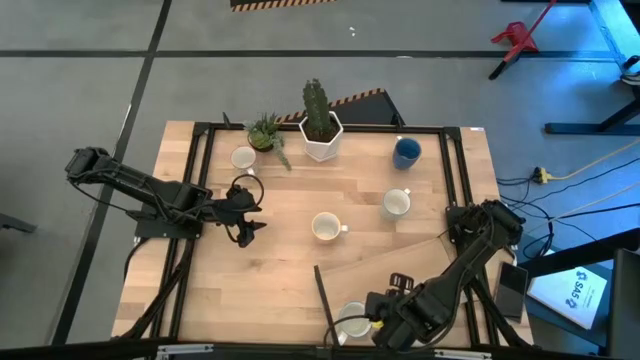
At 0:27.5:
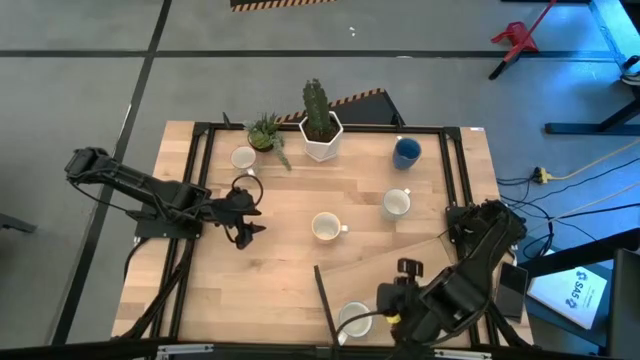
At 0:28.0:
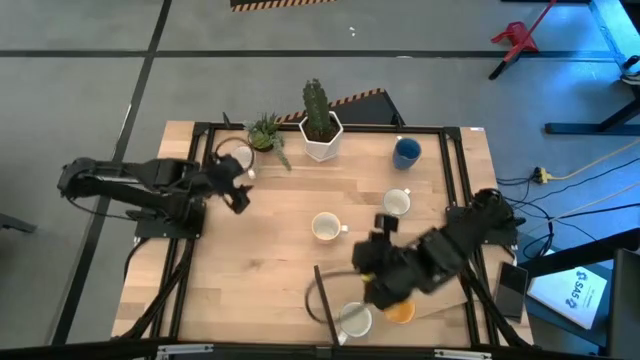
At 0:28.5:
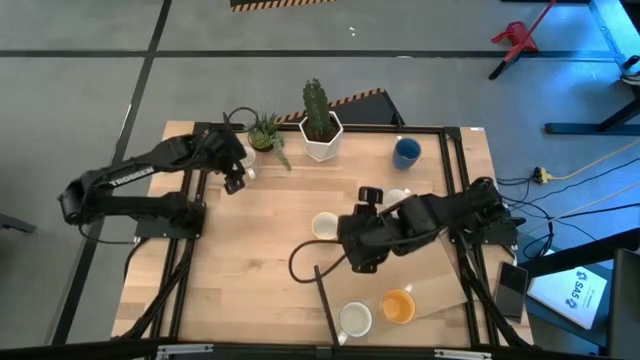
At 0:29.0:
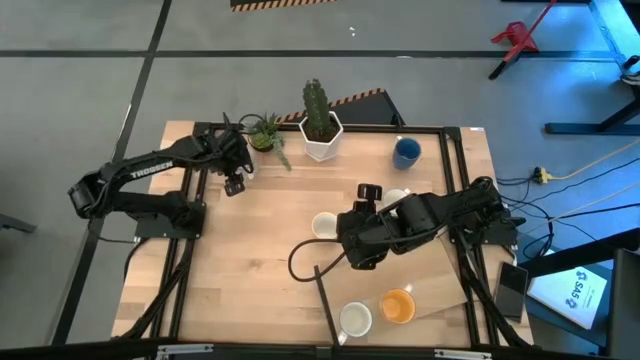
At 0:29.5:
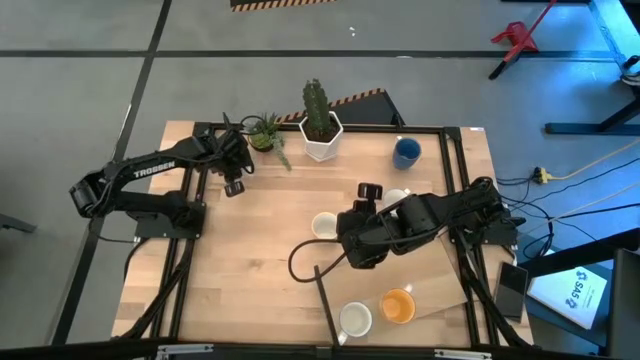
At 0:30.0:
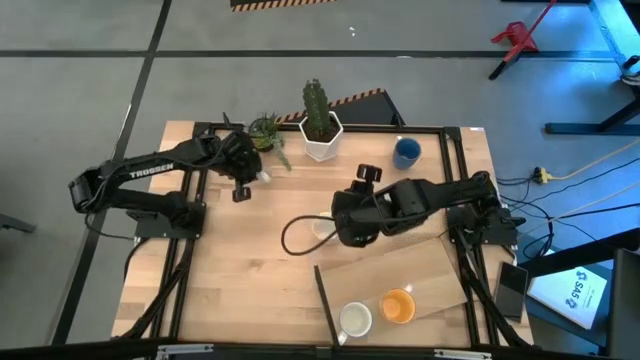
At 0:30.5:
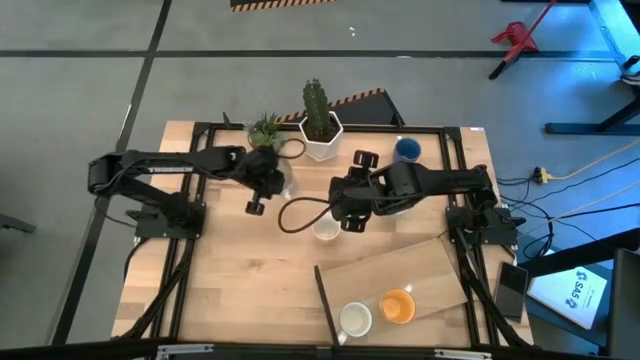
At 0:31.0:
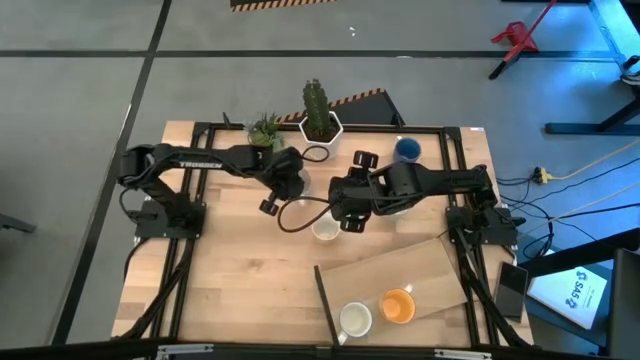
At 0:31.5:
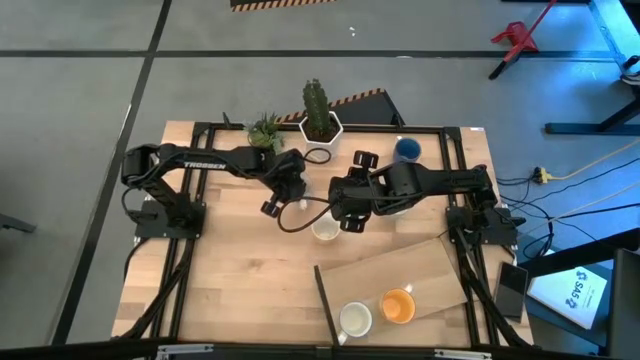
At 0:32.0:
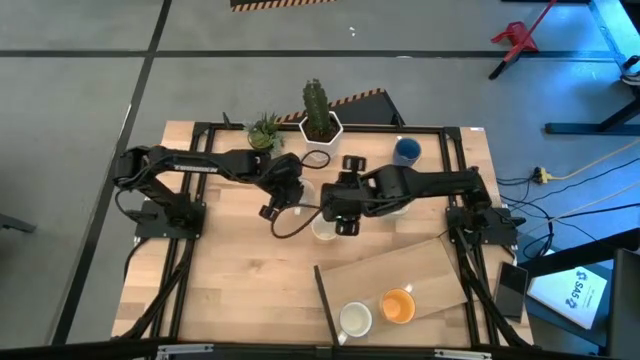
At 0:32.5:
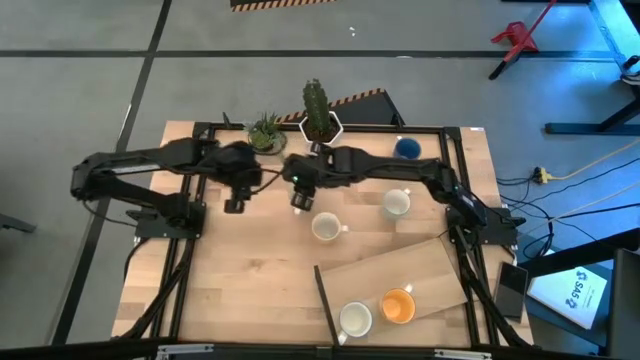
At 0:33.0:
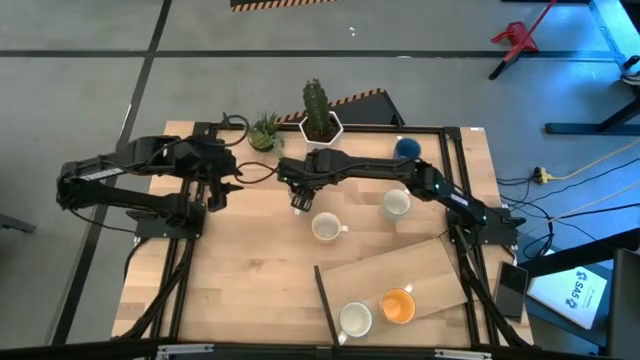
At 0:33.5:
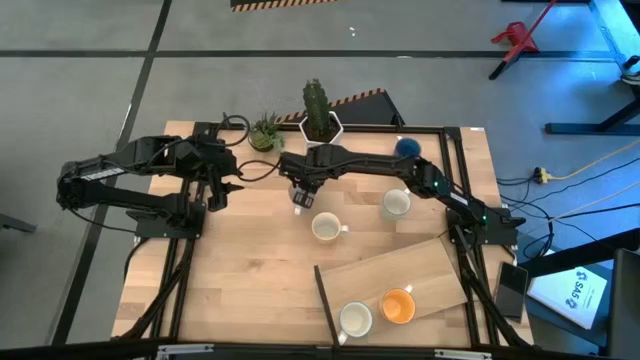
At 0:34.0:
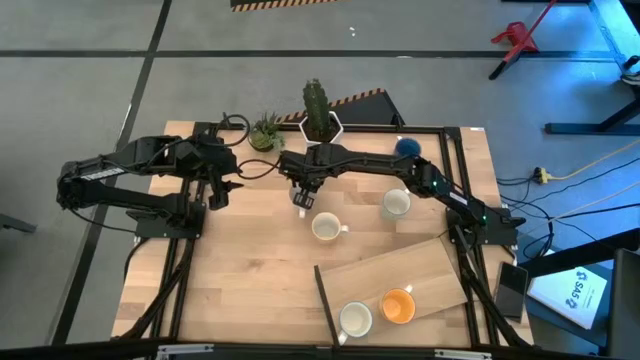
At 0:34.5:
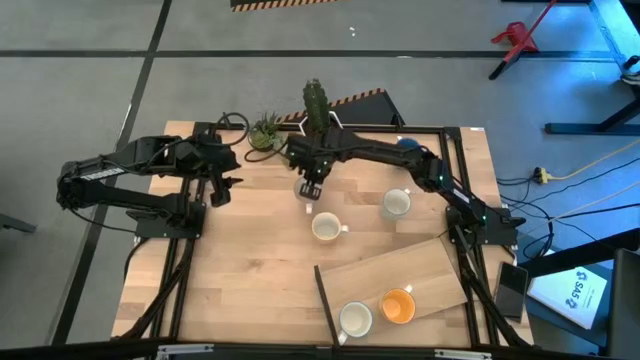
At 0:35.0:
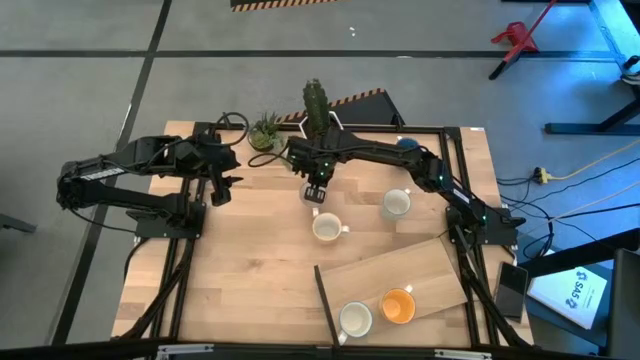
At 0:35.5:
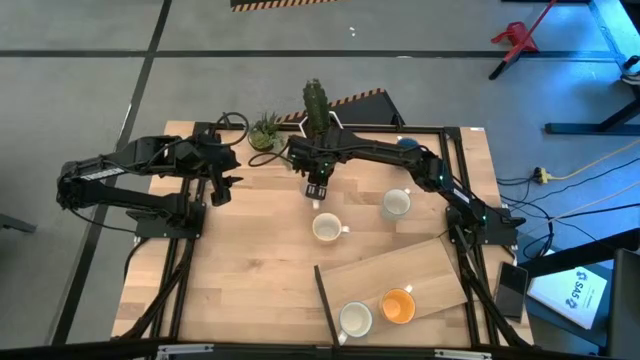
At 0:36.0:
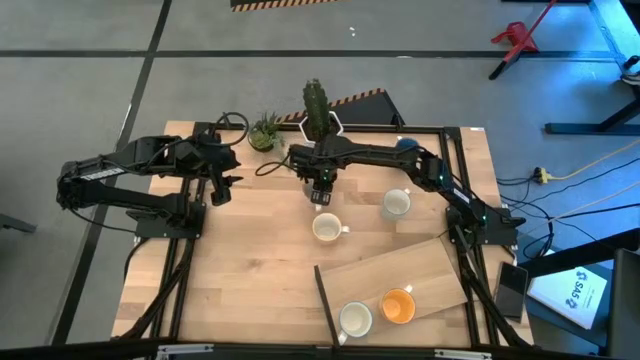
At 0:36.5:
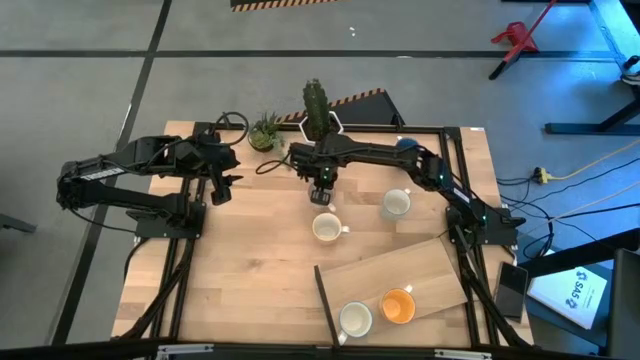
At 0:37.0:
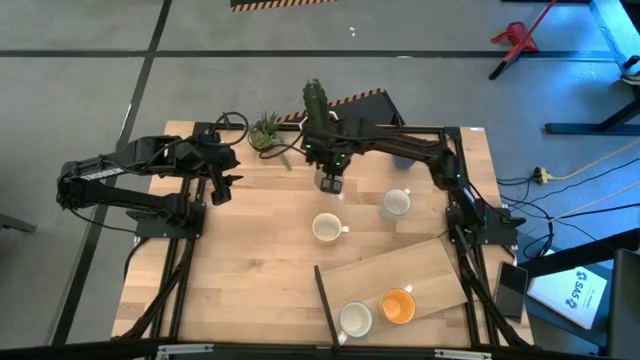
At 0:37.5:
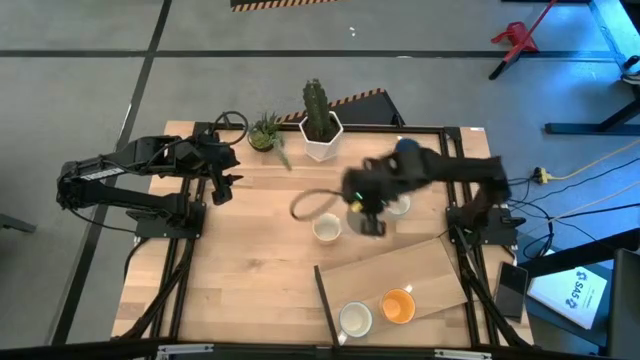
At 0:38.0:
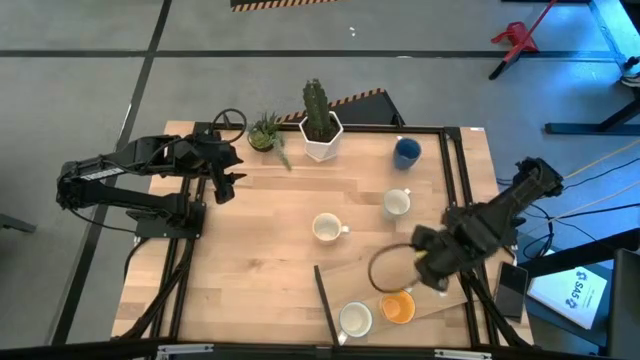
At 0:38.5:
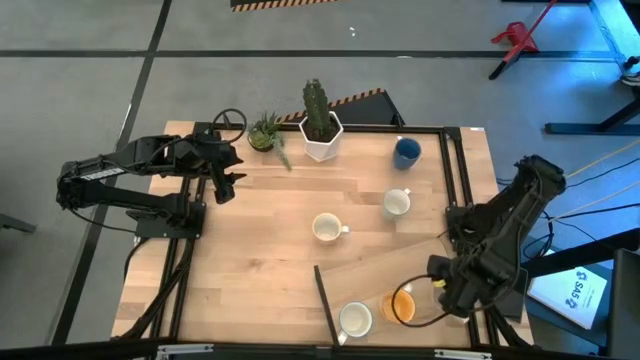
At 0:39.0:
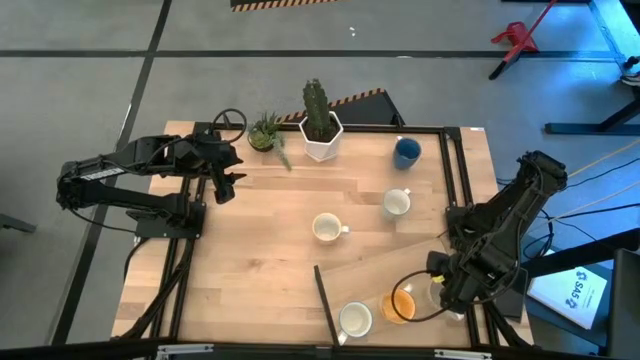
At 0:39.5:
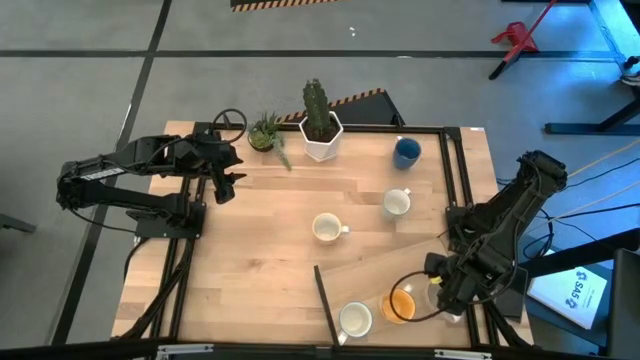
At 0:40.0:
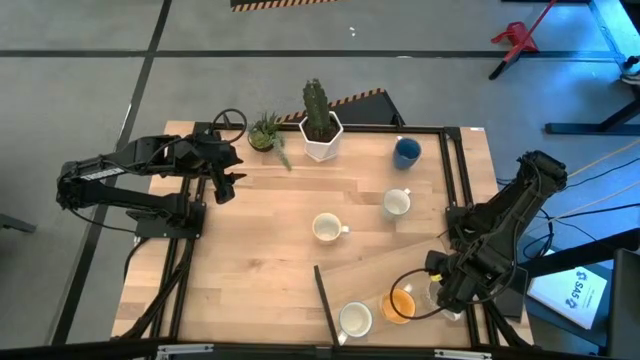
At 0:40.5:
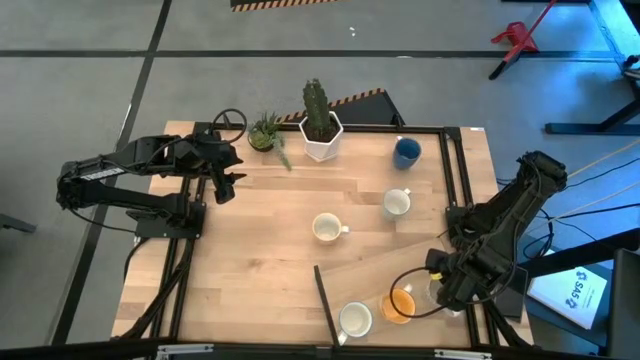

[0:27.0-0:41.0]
Task: Place coffee mugs
Put the gray mug on the shelf

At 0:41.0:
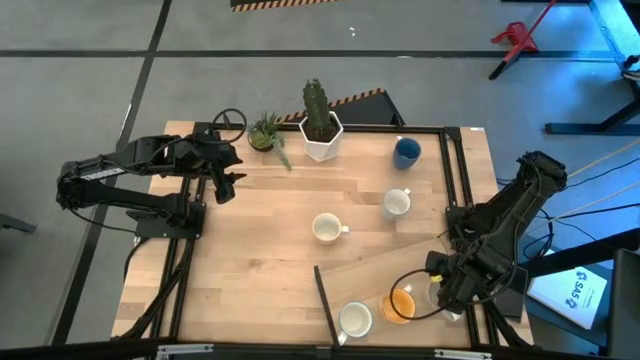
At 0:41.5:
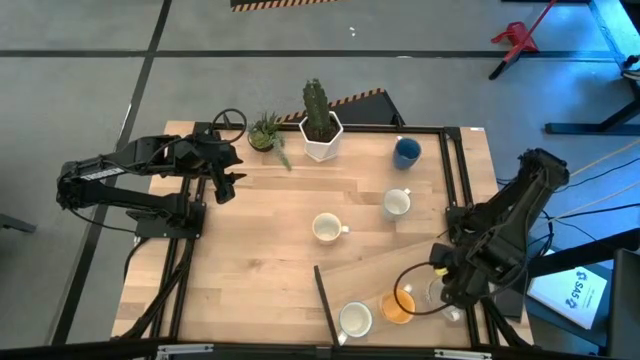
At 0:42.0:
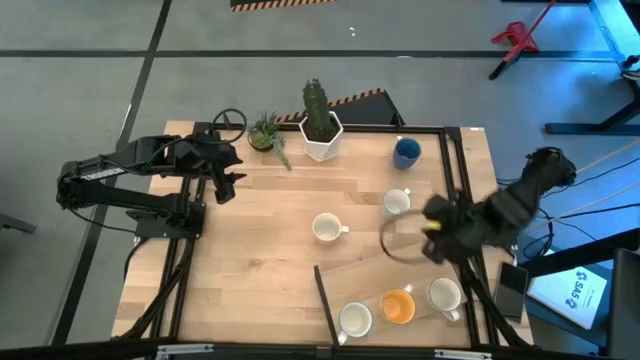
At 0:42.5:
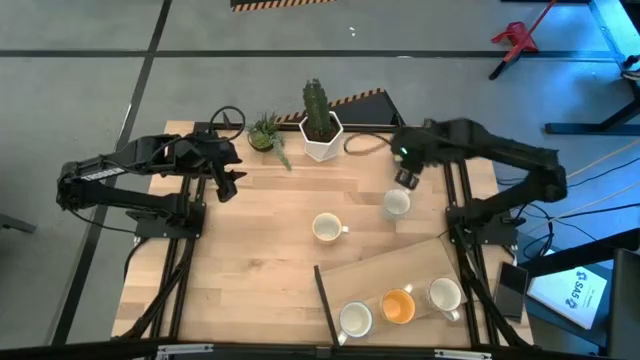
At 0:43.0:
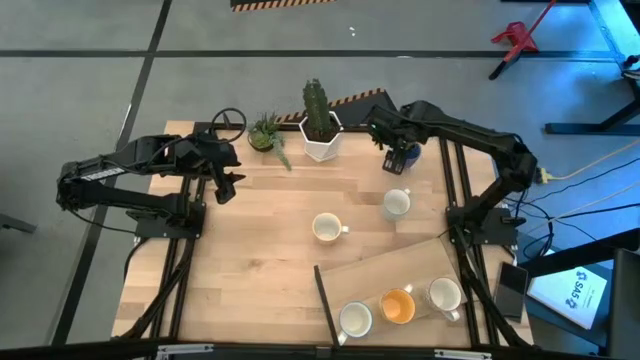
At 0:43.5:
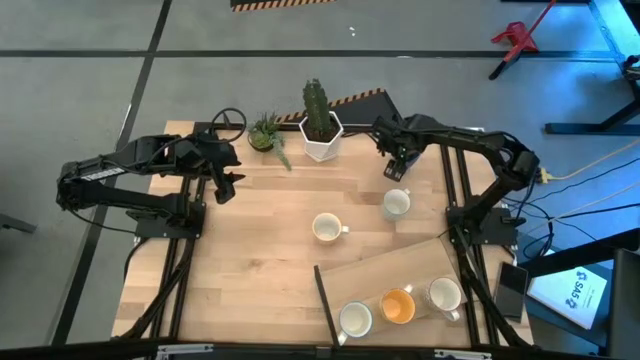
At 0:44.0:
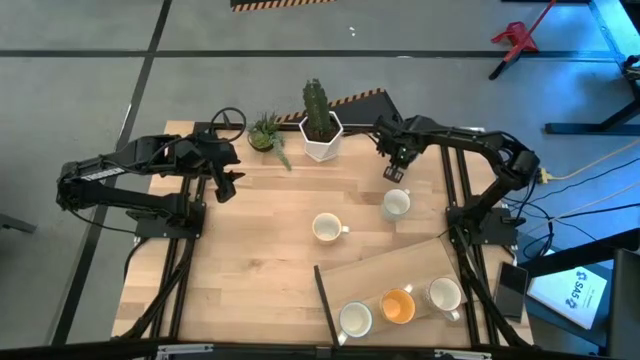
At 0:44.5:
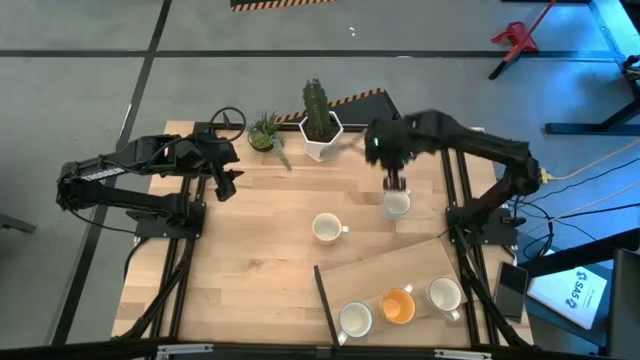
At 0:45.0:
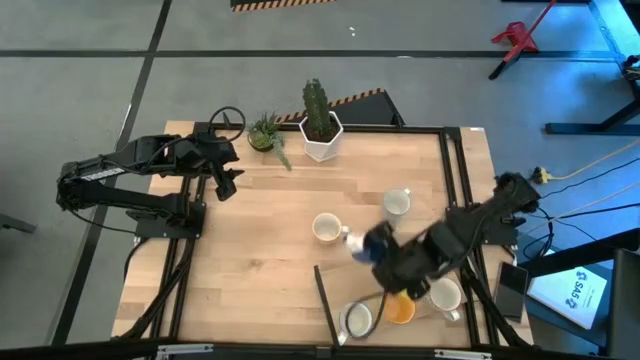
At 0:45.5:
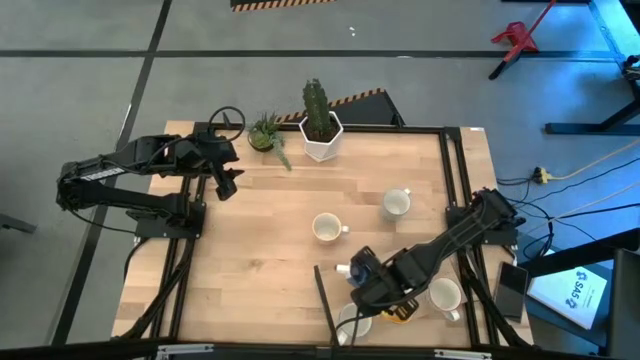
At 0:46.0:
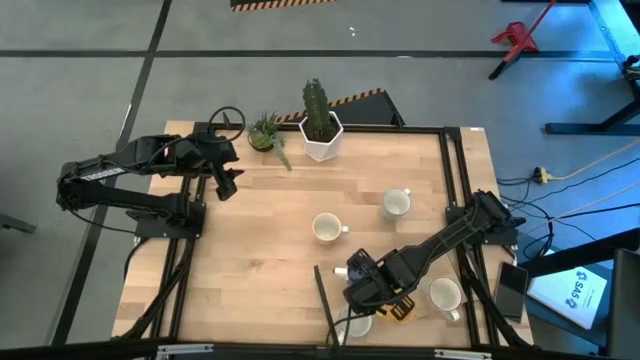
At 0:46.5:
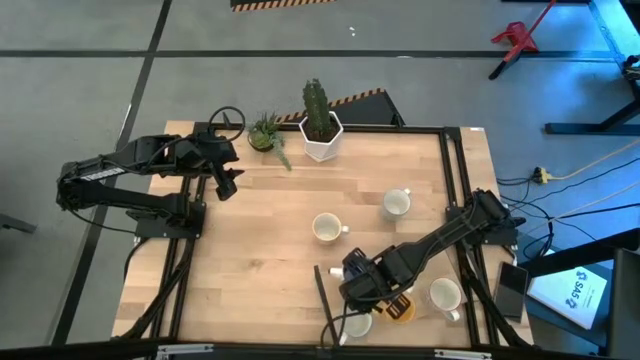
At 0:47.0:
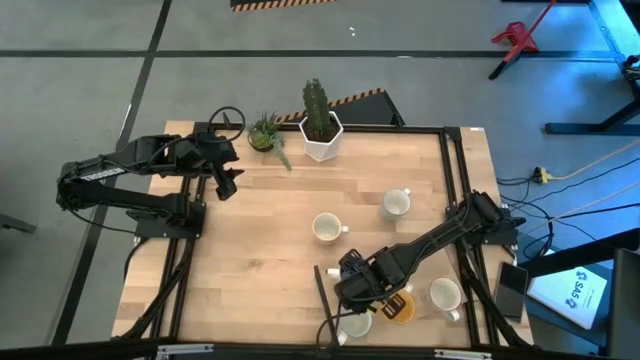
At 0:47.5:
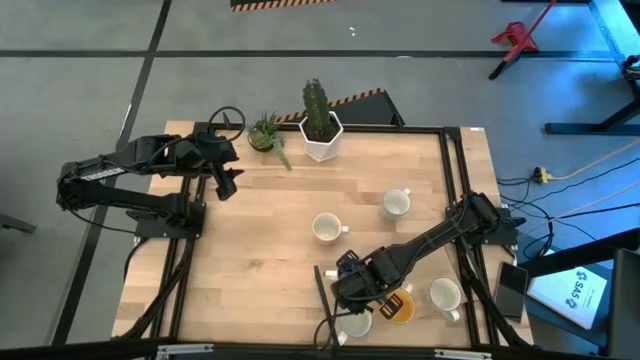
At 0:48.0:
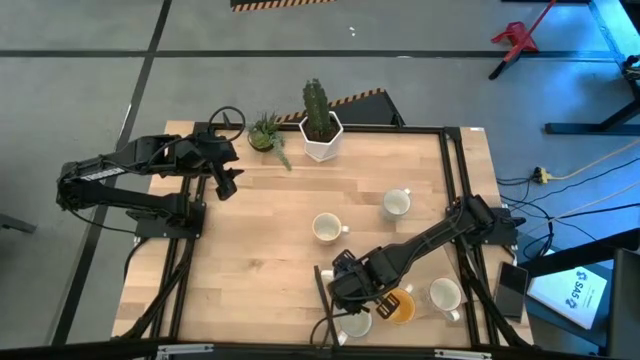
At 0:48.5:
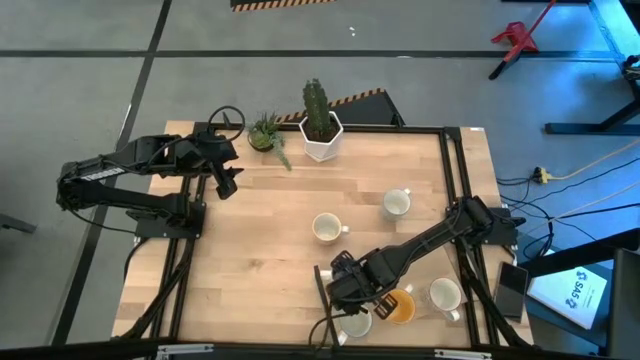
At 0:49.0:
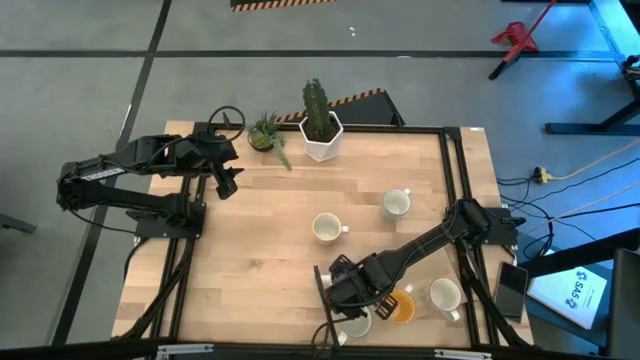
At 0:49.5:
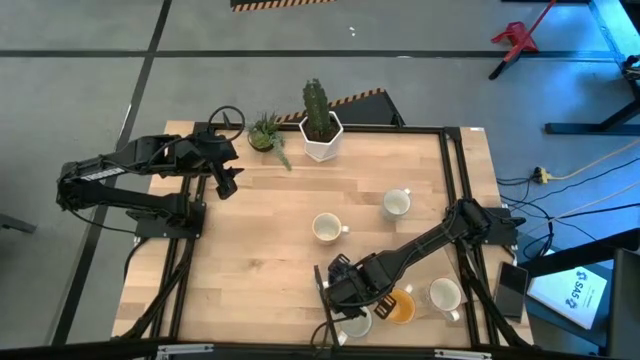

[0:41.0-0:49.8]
Put the blue mug on the shelf
